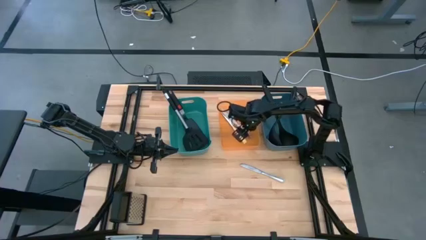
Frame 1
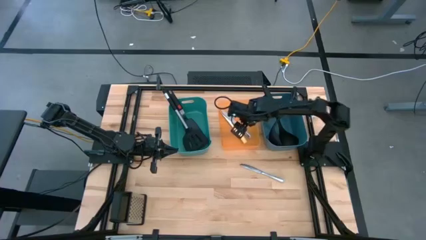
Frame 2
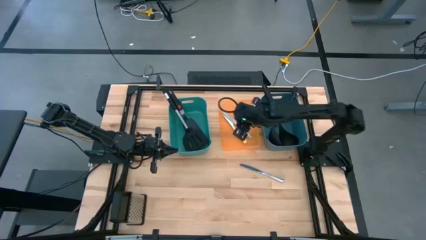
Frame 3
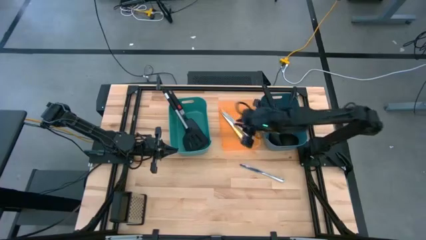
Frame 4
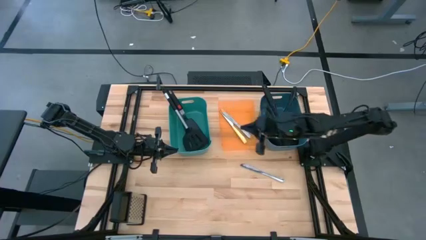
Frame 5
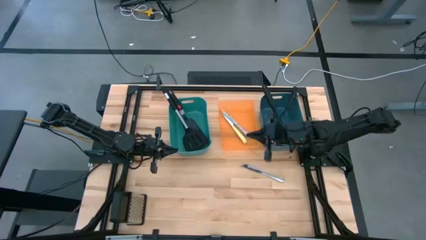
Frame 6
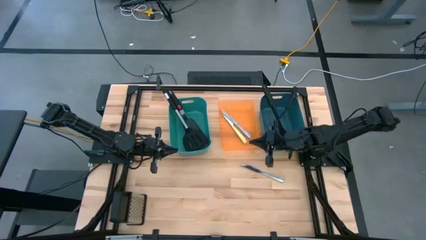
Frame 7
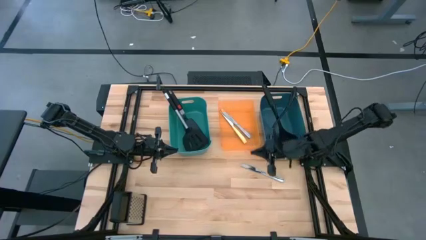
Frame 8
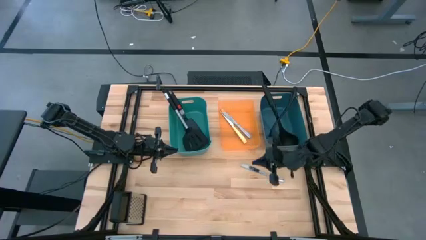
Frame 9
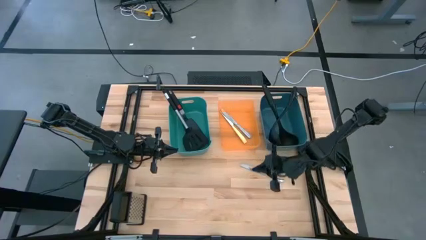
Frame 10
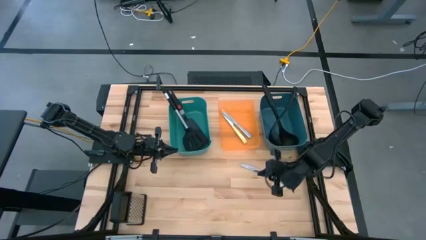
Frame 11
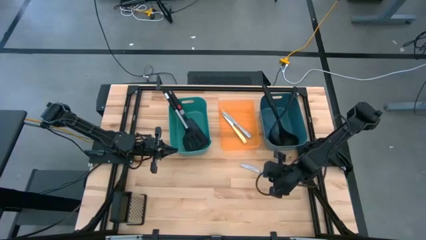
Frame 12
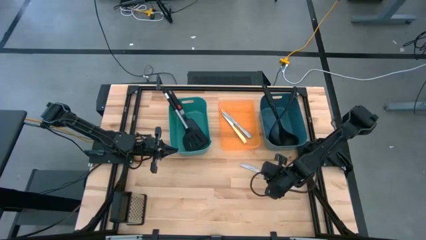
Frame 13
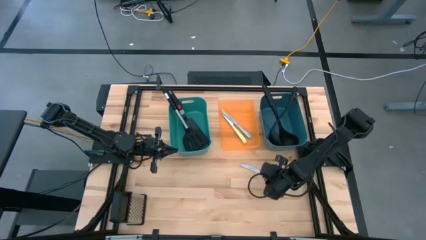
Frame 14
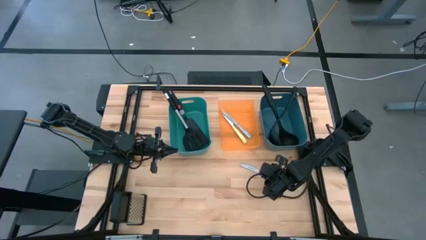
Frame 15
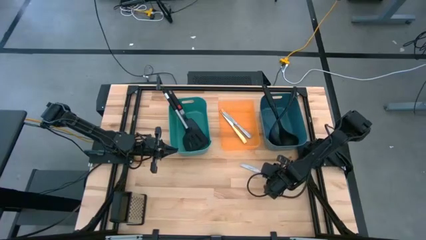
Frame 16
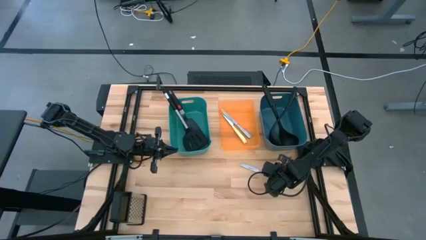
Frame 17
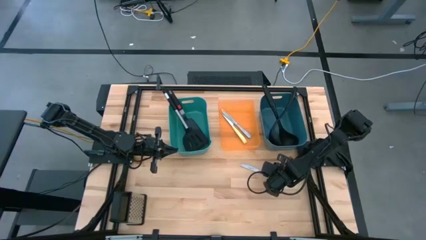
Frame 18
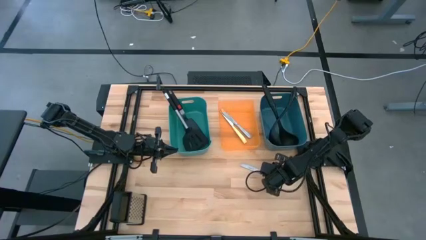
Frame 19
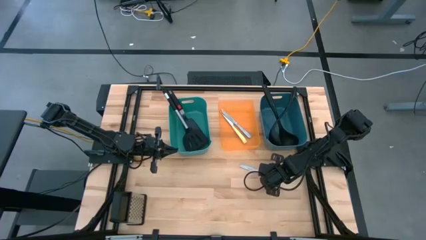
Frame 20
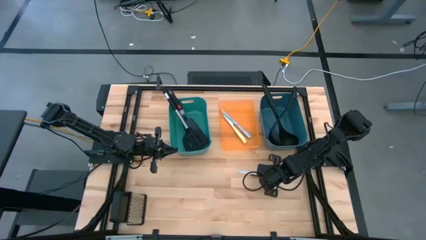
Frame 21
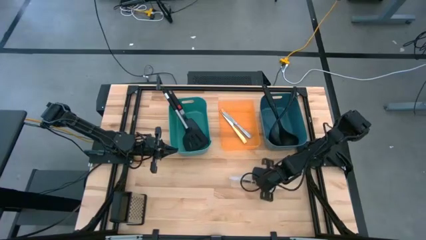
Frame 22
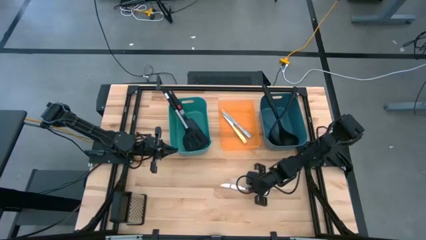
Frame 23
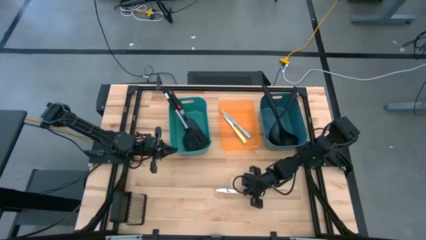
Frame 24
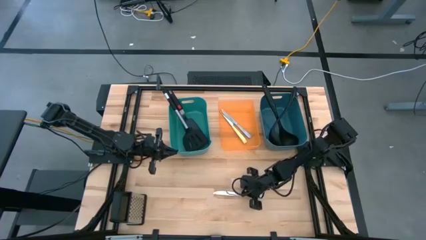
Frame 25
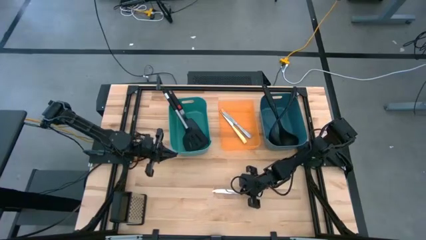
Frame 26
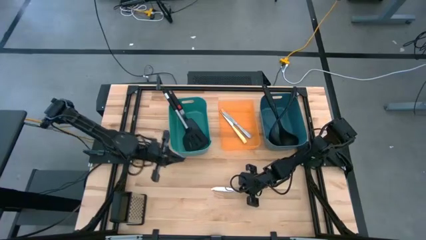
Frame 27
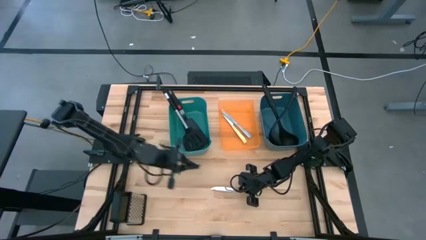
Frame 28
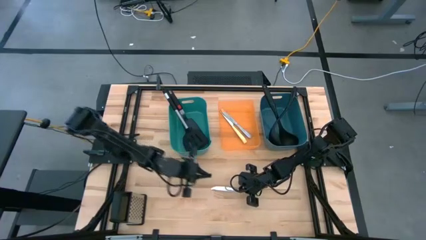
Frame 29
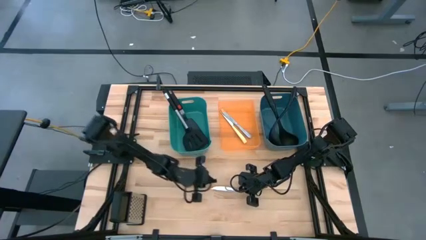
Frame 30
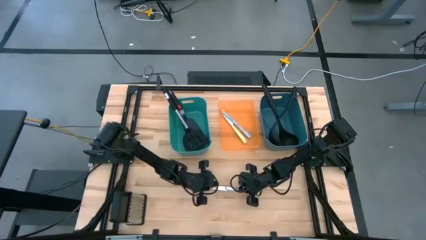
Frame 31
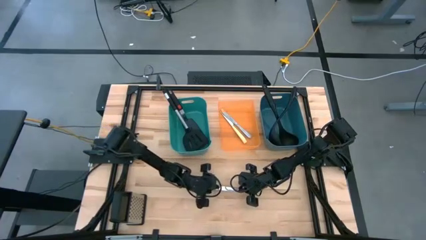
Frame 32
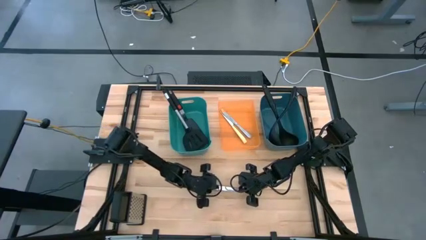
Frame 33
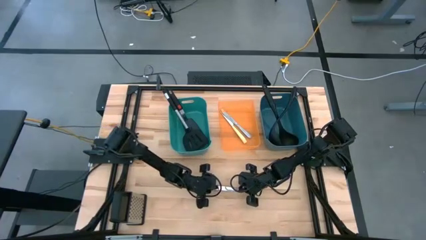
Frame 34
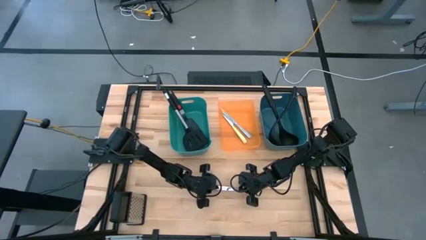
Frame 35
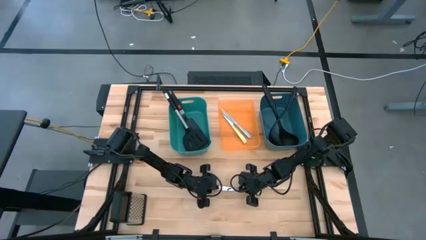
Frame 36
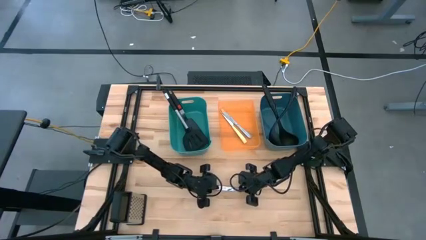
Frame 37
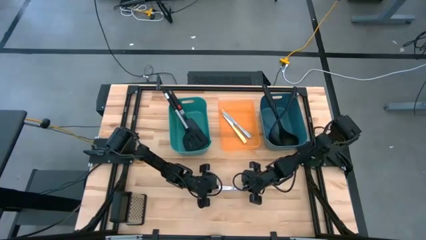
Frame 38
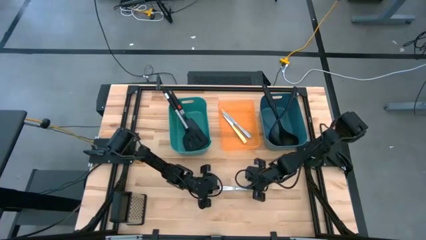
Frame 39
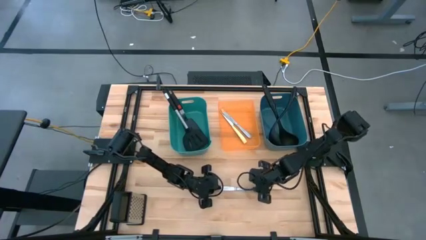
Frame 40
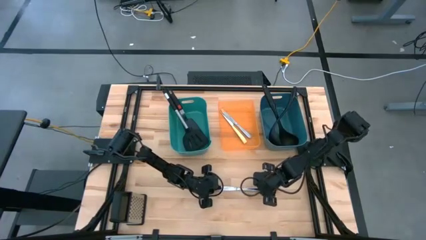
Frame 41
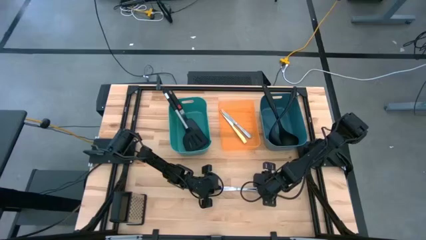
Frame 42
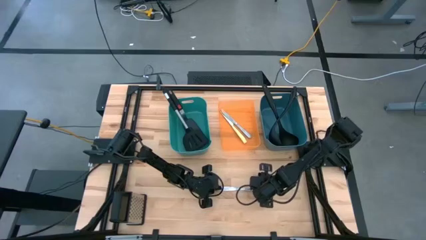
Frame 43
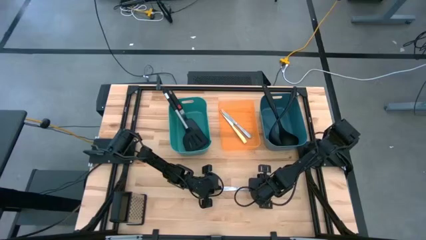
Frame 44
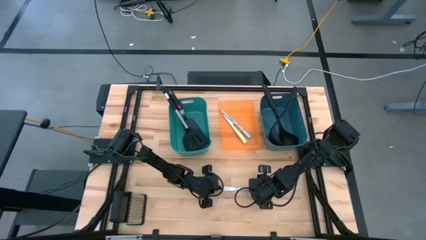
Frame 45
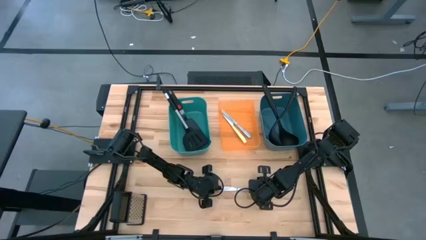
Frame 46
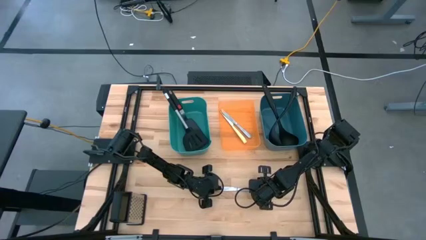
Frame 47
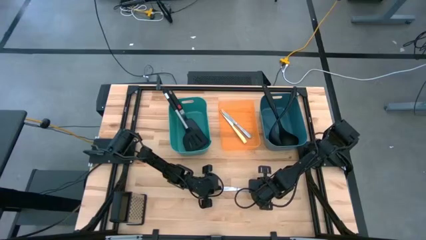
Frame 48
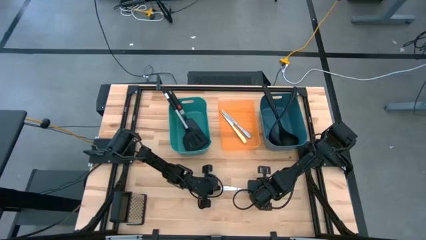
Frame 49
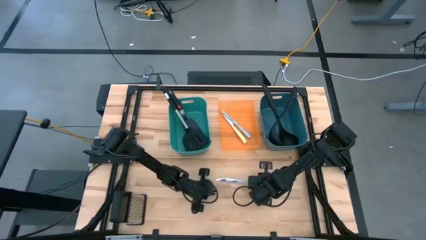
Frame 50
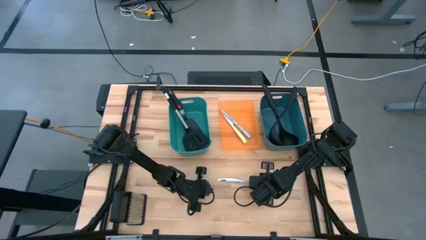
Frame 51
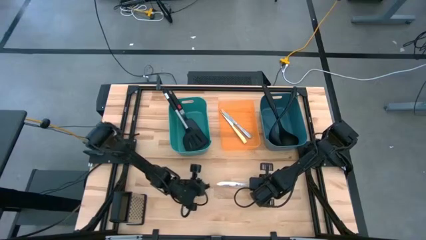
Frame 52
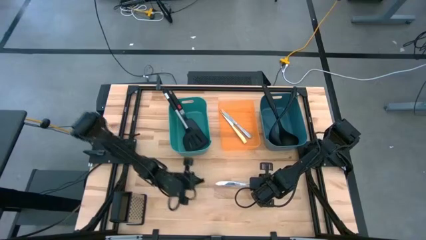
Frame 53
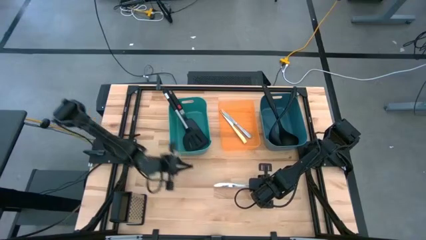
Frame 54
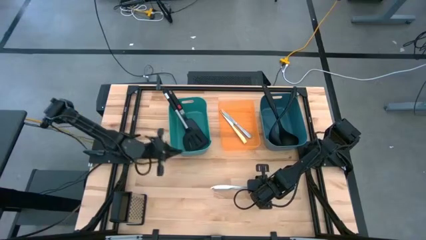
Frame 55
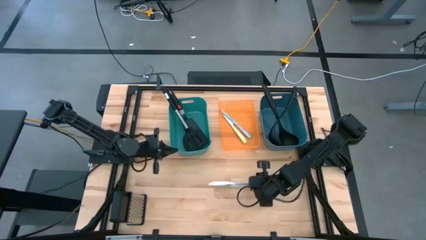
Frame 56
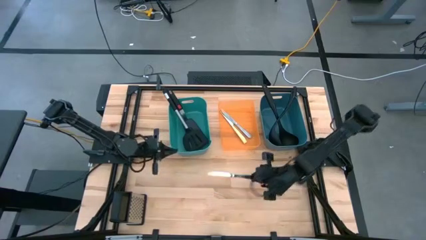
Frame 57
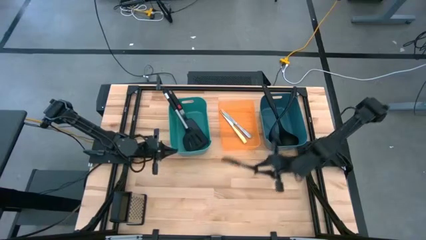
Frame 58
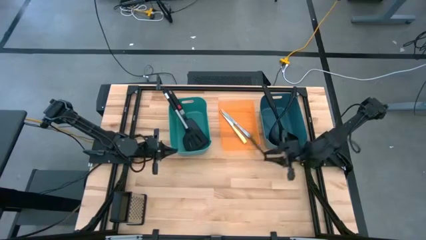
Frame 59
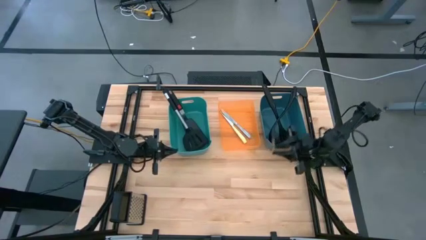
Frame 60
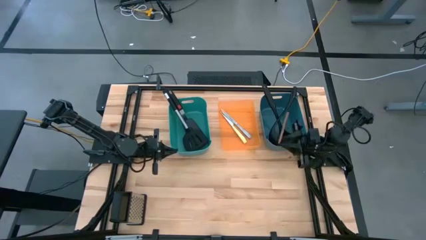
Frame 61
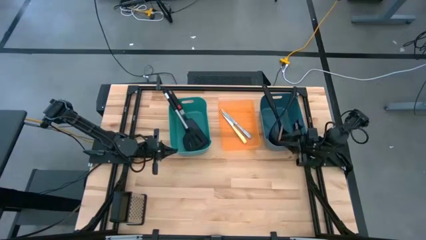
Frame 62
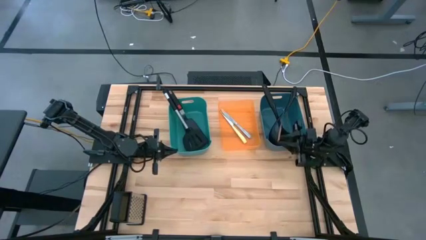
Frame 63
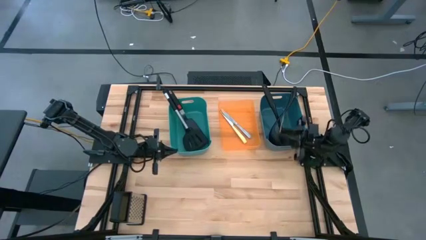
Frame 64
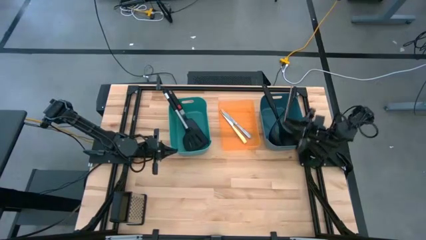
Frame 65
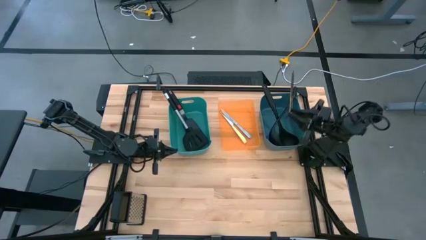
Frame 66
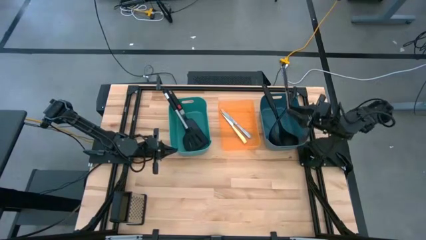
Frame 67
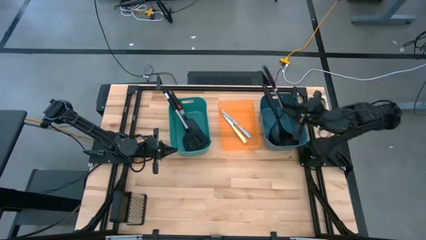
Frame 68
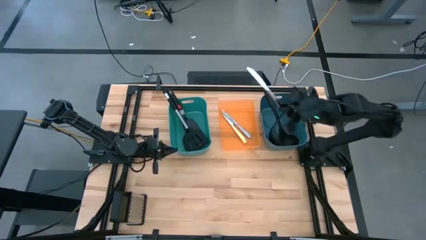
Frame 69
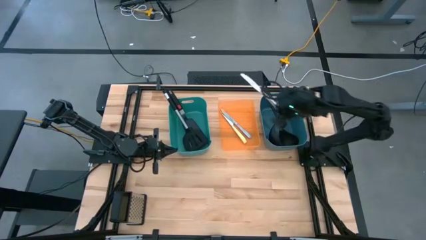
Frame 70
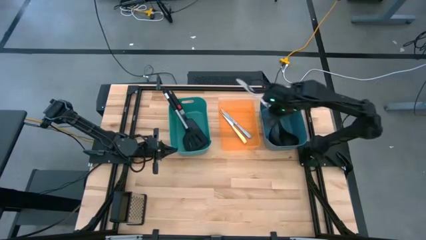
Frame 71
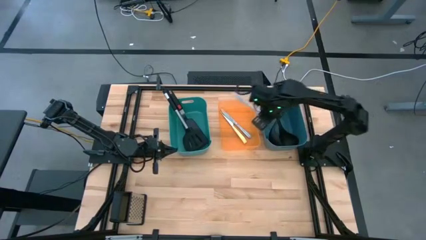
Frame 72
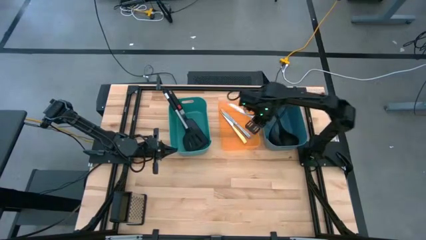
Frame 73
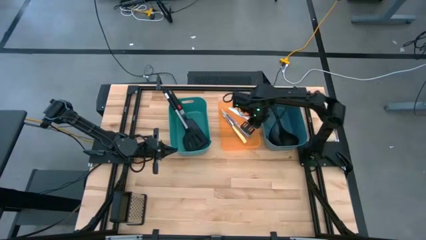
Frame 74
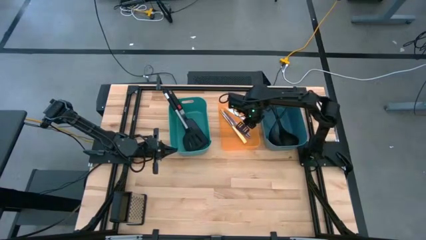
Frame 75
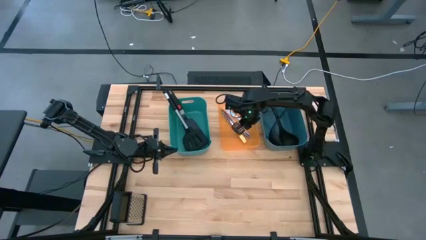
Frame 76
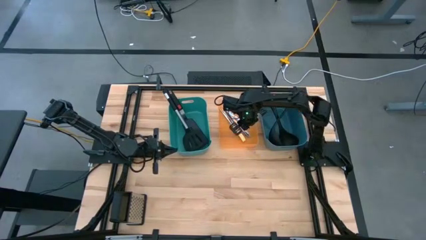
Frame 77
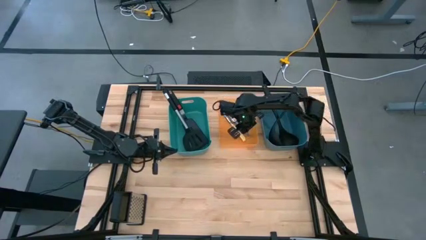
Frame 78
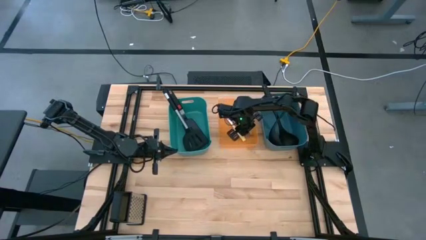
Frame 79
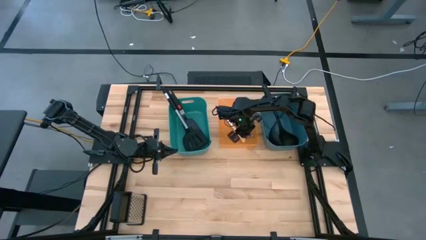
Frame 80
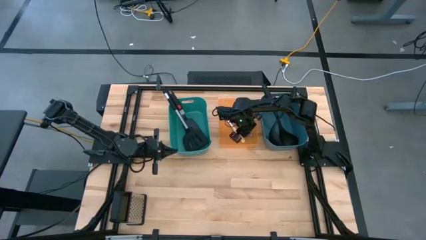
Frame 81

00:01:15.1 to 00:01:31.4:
Task: Pick & Place Kitchen Items
Put the silver knife into the orange bin

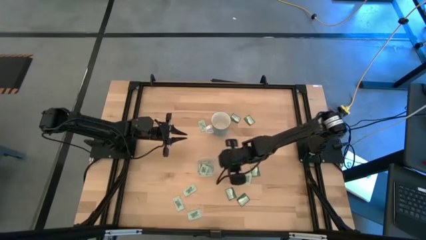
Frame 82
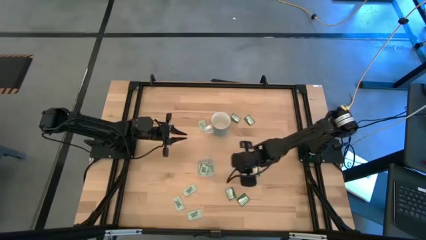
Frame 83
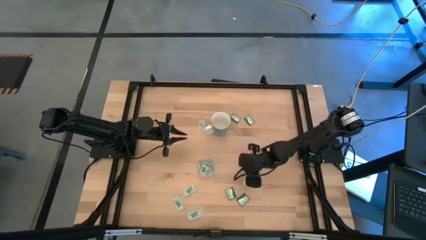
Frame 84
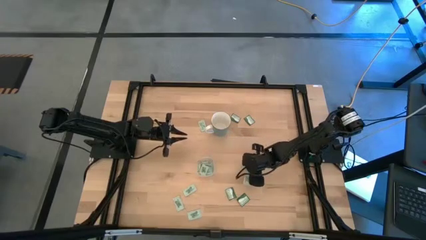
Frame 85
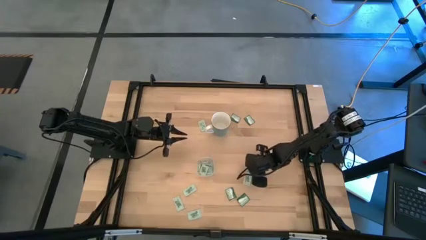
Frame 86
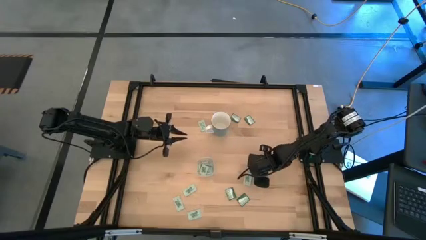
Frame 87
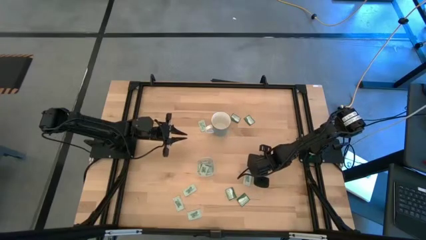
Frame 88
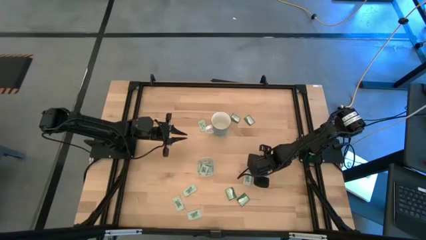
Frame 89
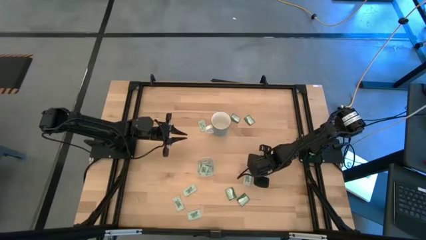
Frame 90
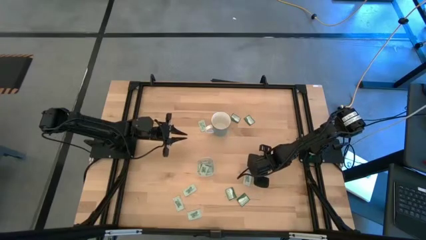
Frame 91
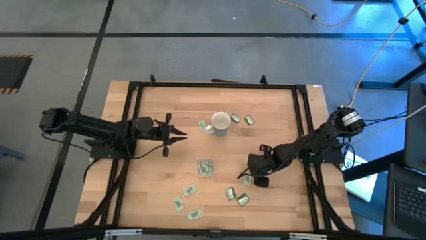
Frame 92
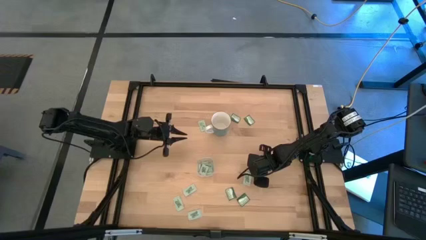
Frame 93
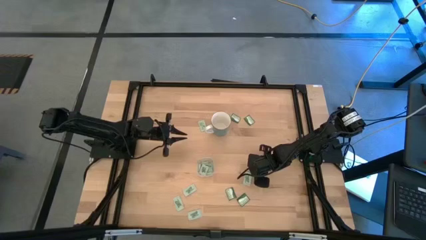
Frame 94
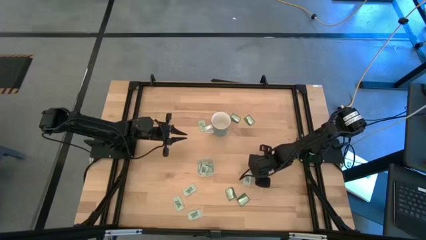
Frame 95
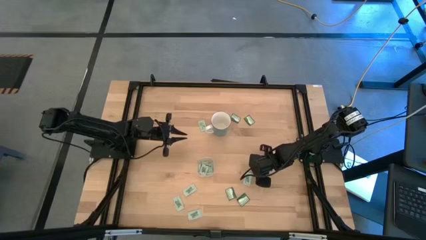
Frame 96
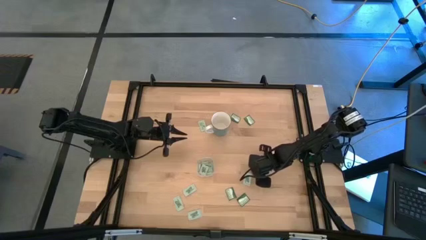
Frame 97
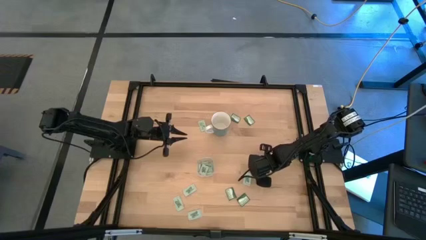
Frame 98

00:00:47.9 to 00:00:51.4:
Task: Pick and place Stevia / Truvia into bins
Put the green stevia packet into the transparent bin
